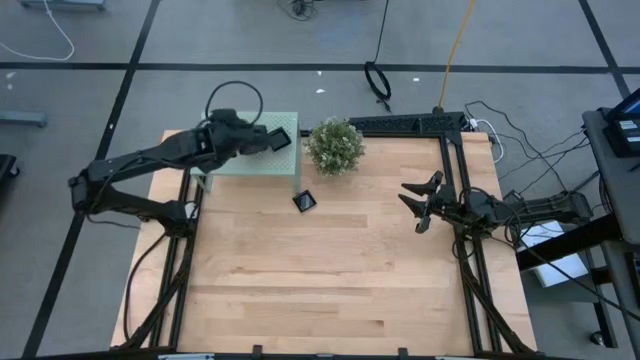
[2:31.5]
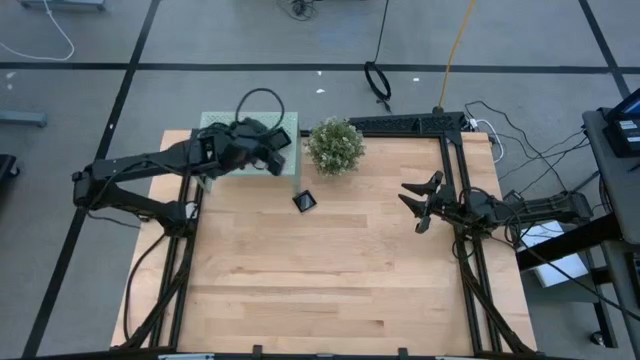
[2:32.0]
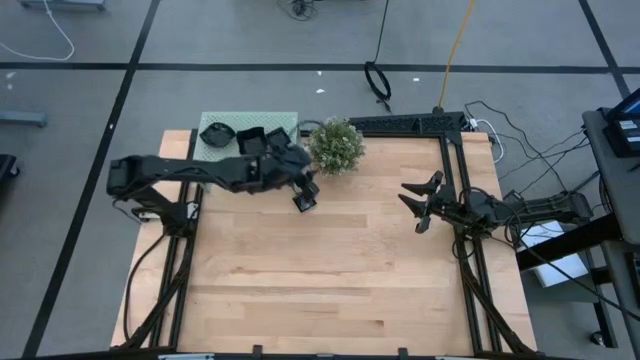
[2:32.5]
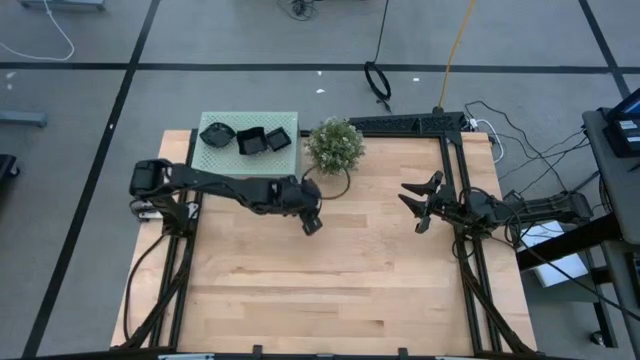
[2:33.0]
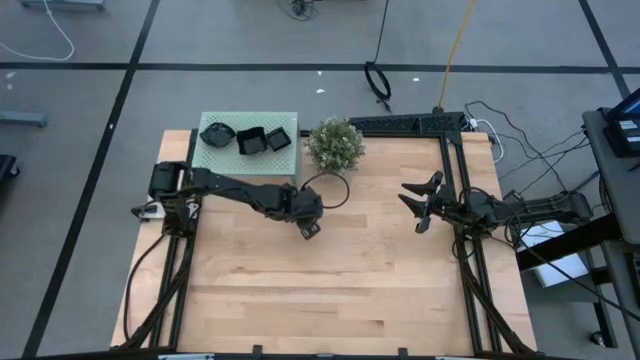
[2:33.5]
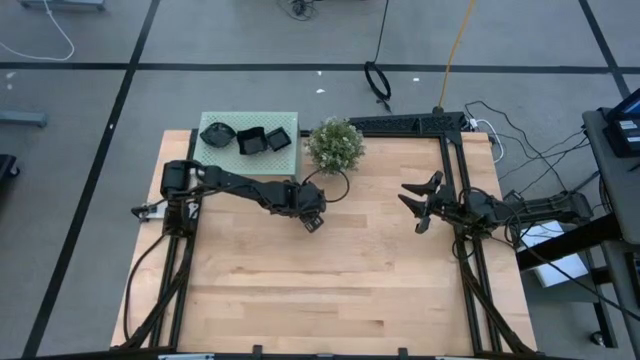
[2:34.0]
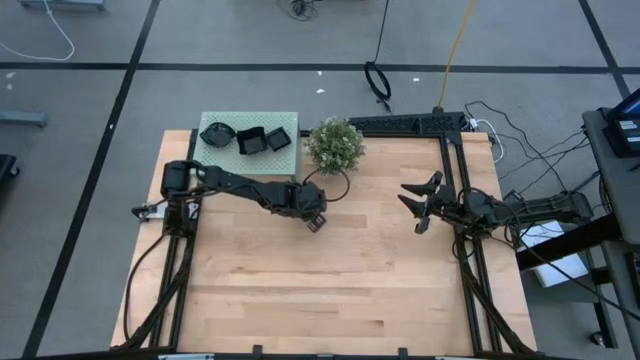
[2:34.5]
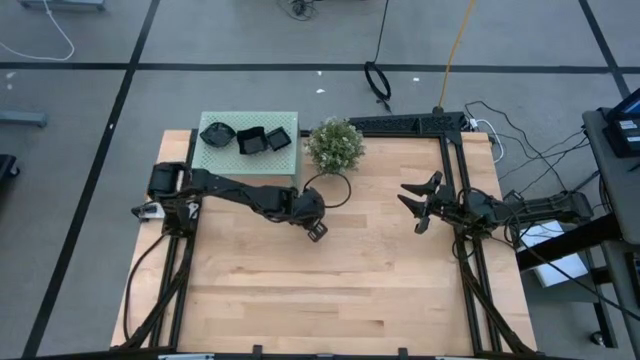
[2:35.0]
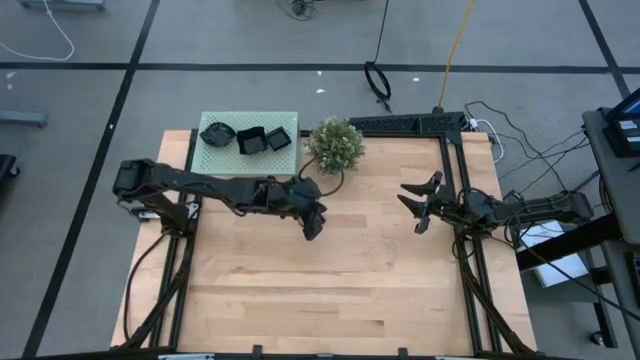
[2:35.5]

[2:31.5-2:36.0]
Task: Pick & Place Mini shaped plates
Stack the square plate on top of the square plate on the shelf

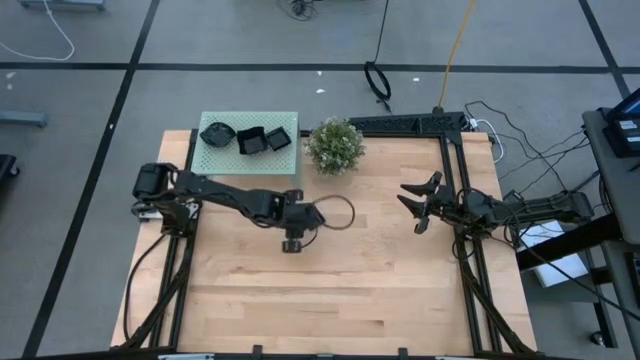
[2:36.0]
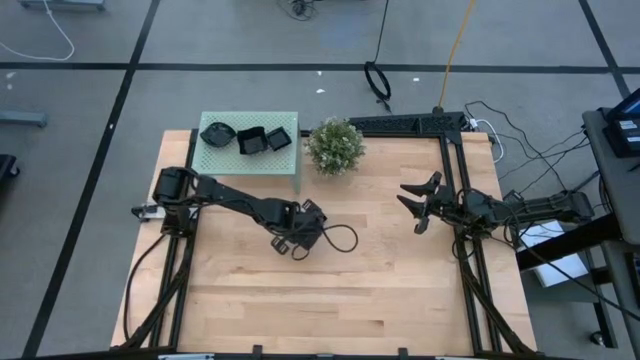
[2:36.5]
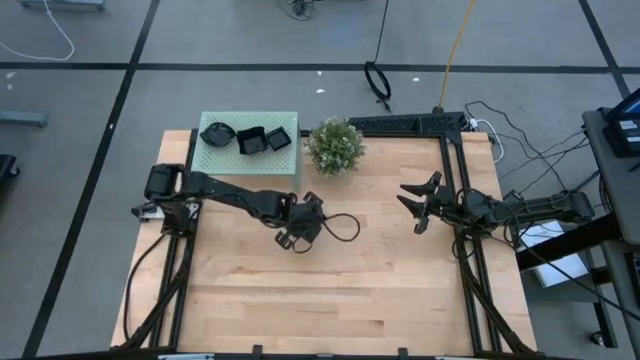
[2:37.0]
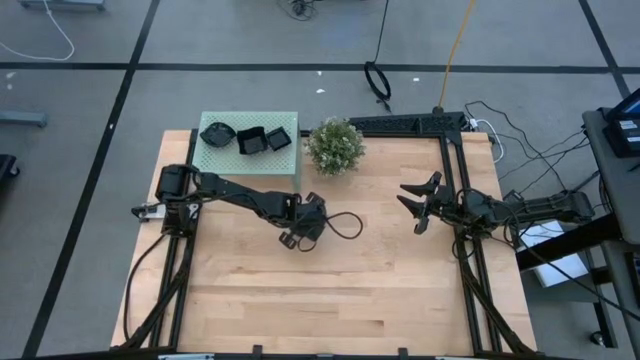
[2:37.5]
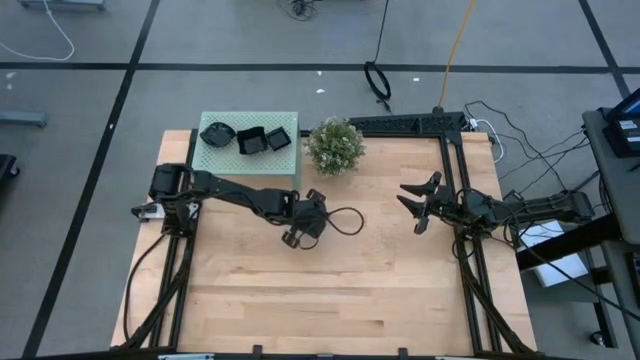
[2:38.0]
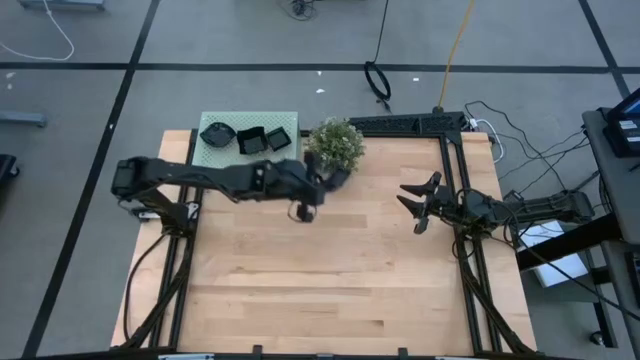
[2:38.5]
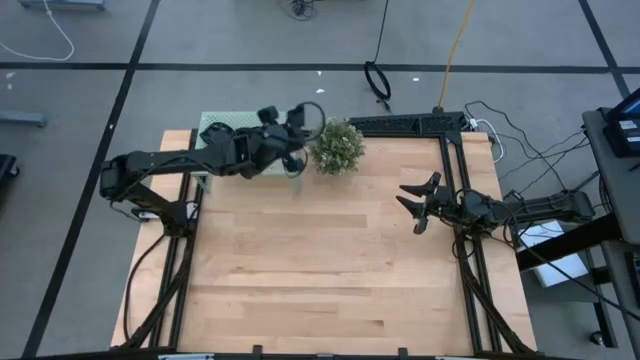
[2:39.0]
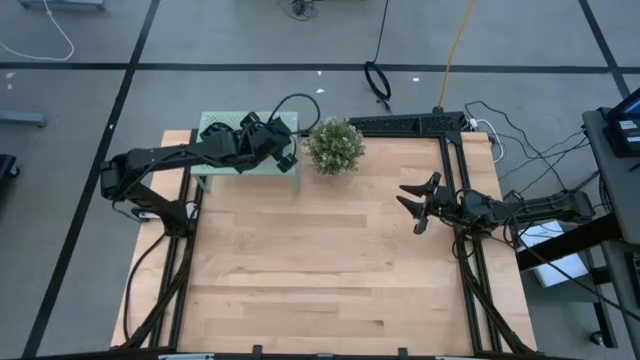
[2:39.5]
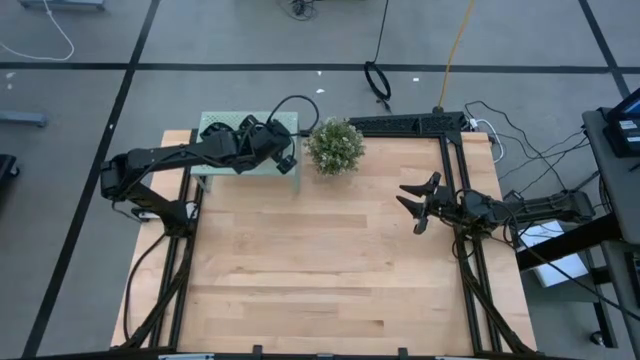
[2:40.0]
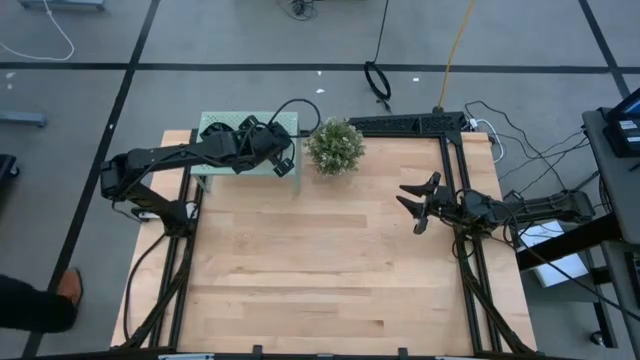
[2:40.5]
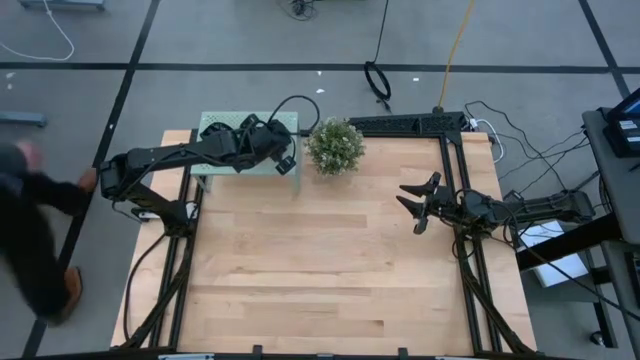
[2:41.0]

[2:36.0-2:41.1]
Stack the square plate on top of the square plate on the shelf

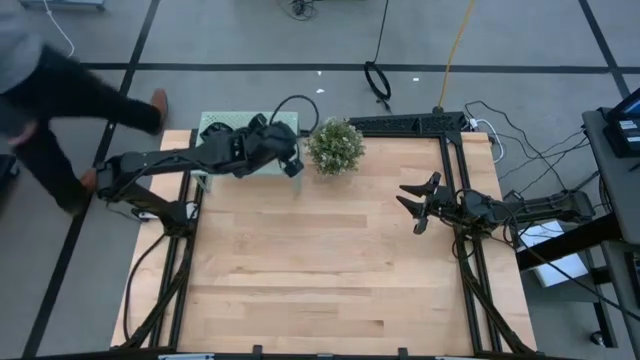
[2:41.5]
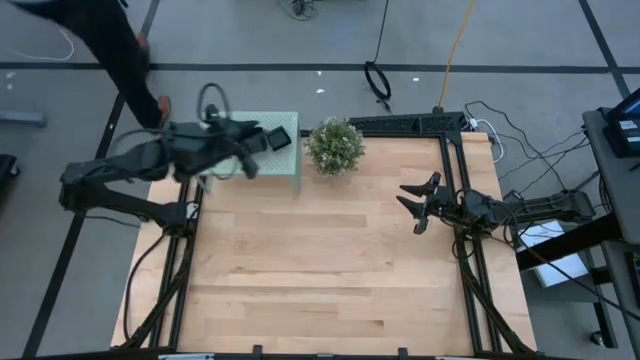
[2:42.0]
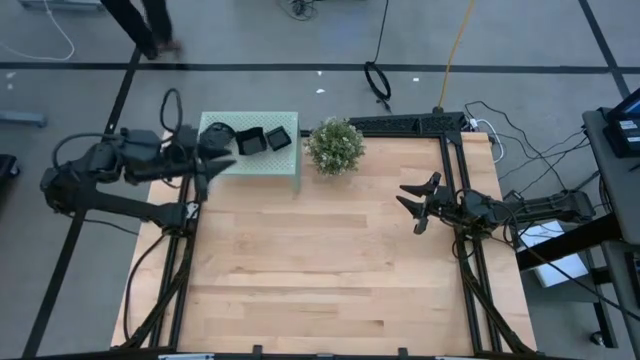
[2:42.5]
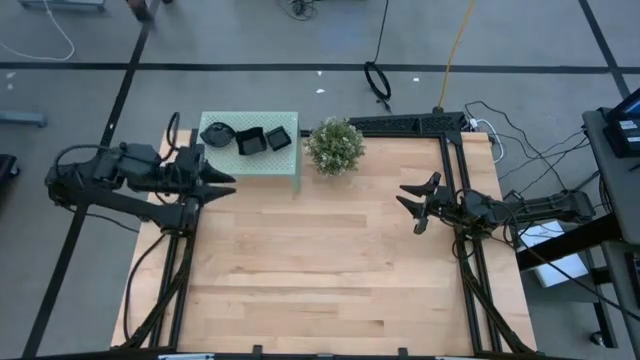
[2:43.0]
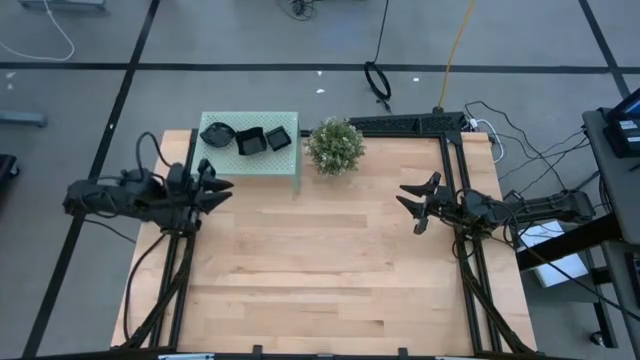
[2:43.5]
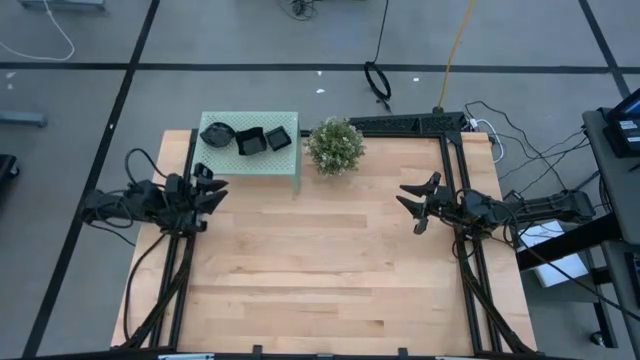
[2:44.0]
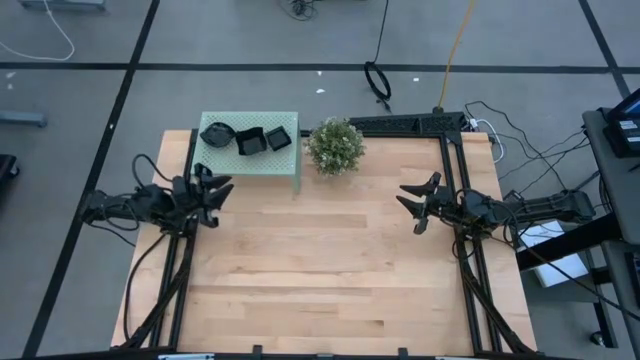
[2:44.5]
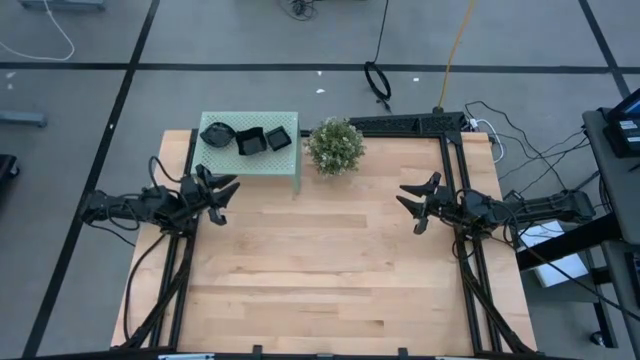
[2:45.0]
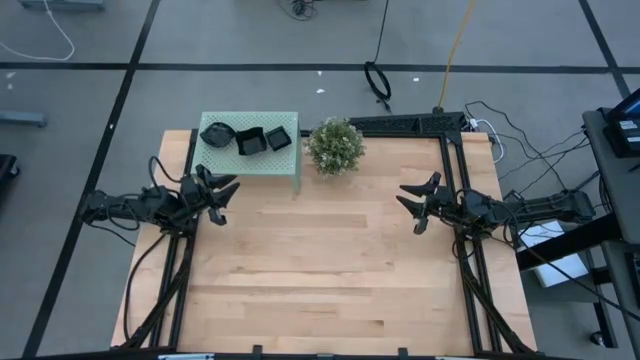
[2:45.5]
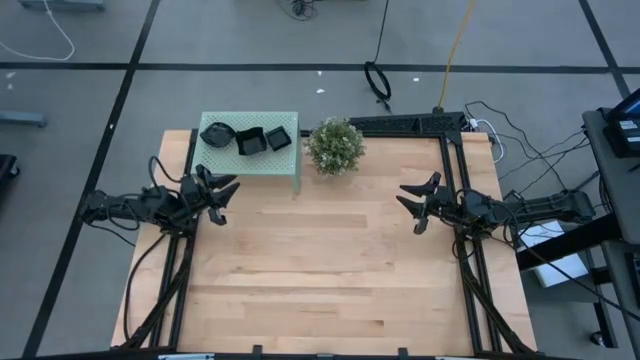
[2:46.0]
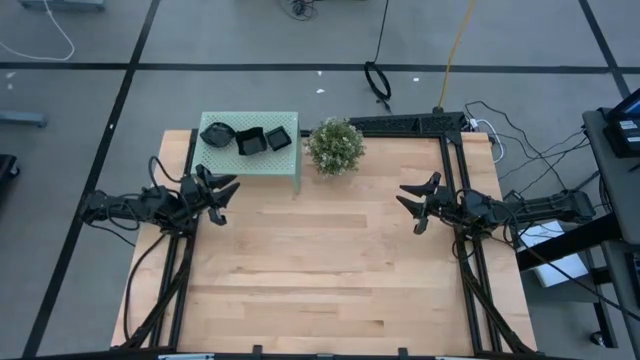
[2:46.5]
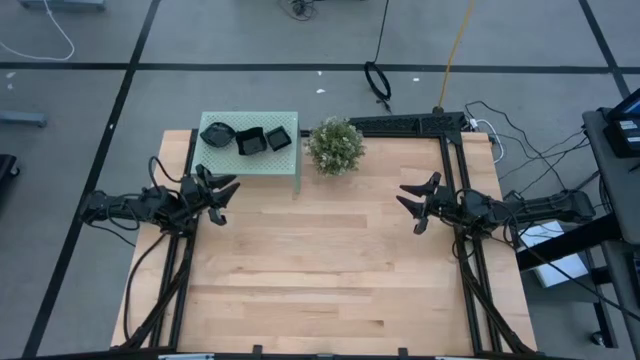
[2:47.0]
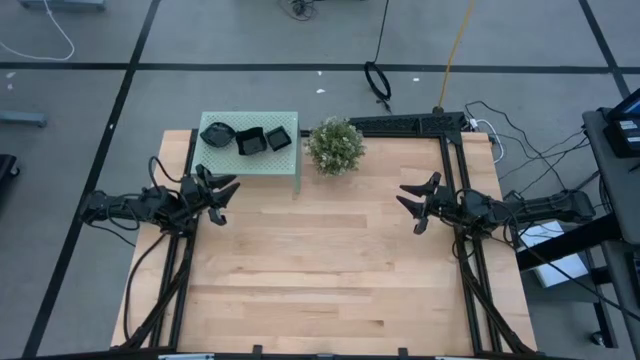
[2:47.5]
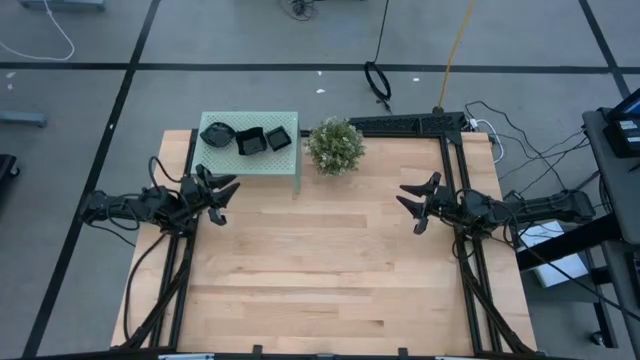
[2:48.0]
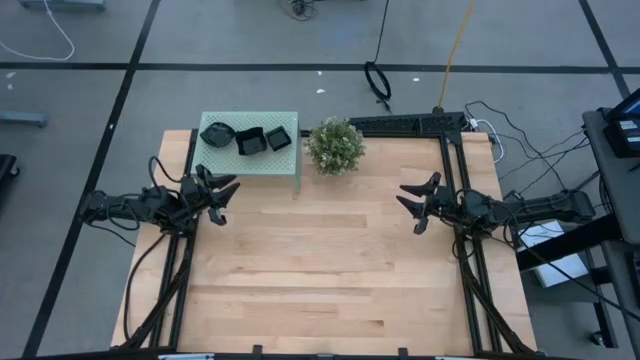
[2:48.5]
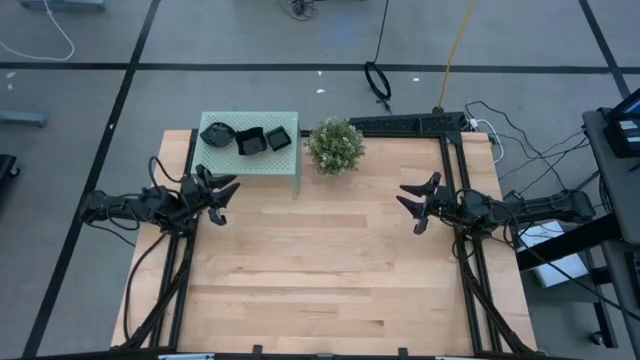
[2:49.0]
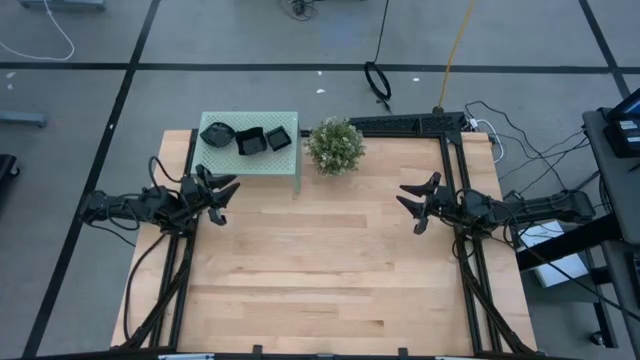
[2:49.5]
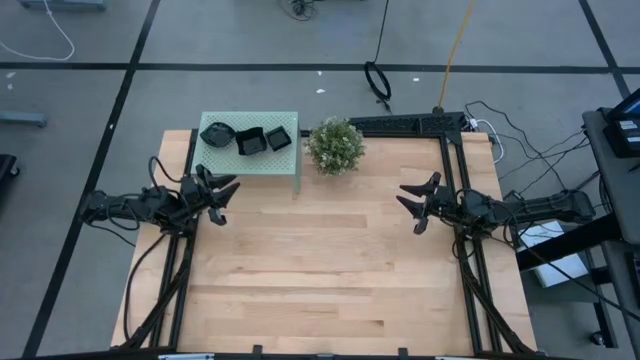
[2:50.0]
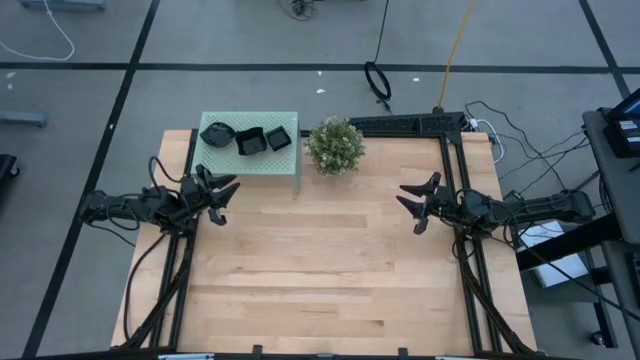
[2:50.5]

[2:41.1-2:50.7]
Return to Home Position

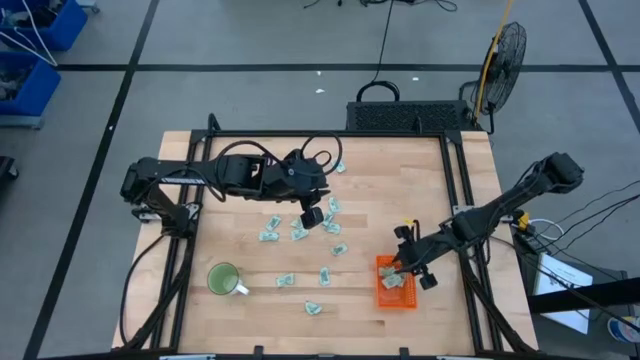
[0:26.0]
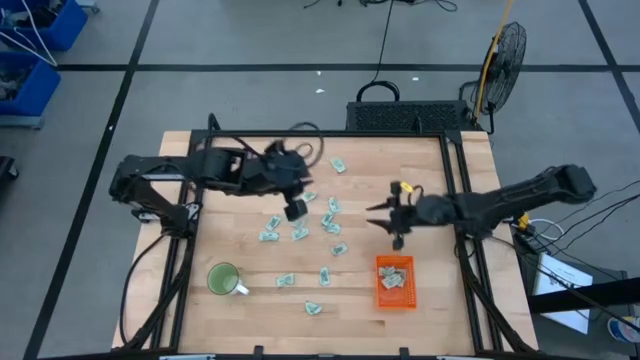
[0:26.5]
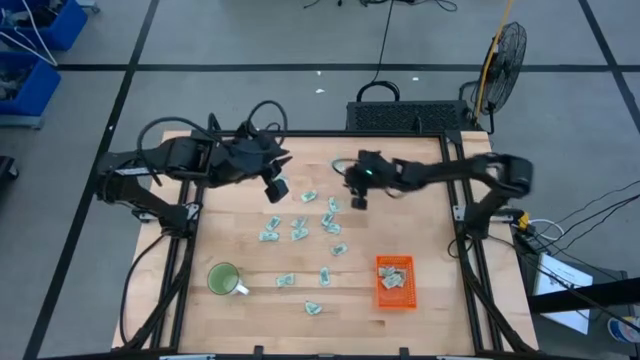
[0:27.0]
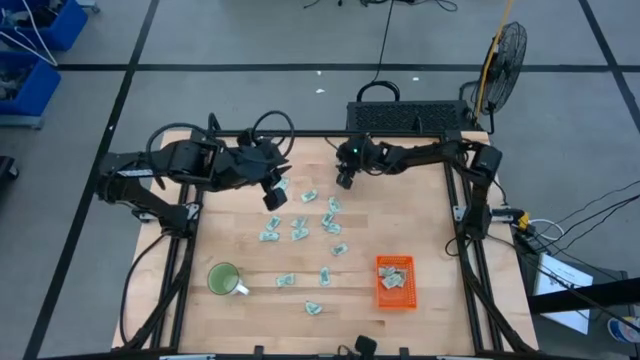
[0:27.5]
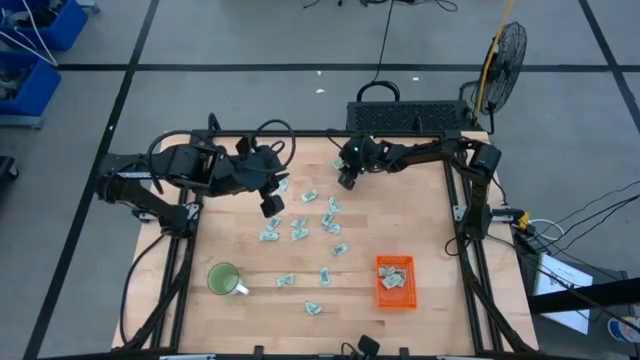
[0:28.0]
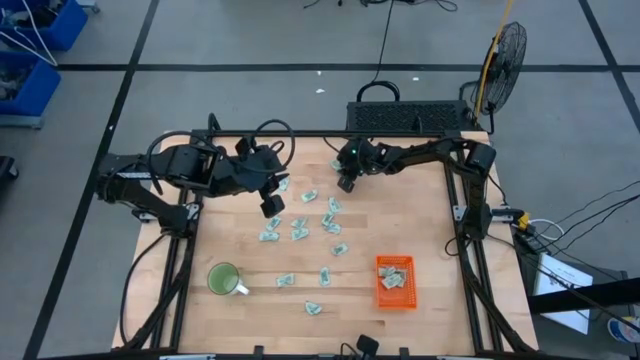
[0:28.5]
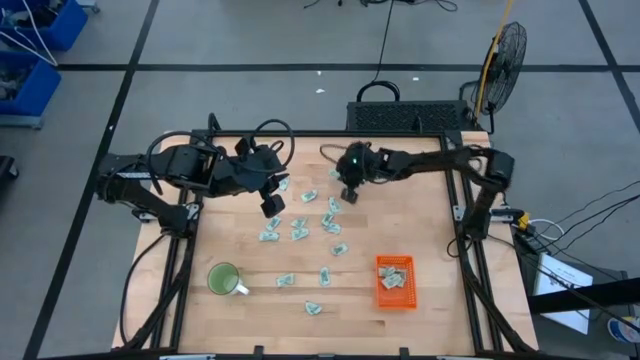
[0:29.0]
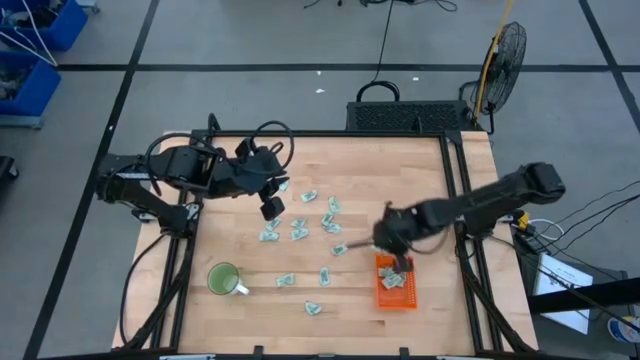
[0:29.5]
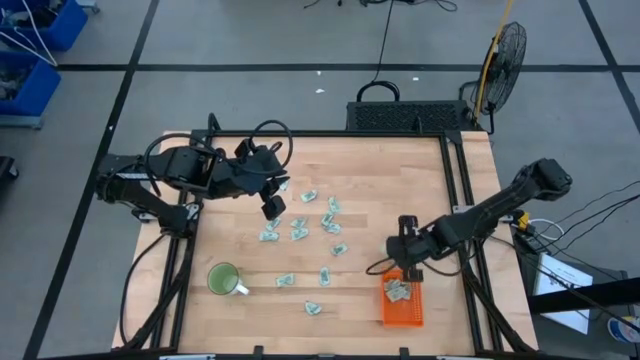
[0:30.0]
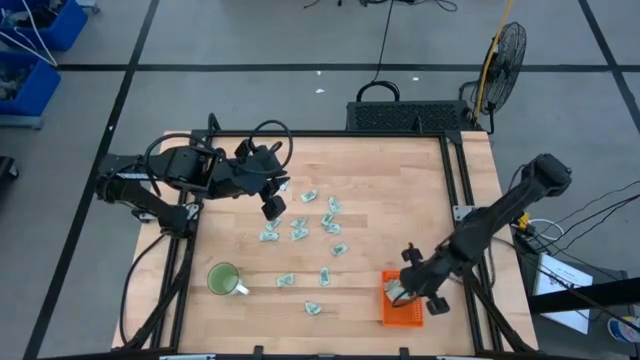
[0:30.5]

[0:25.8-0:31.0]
Task: Pick and place Stevia / Truvia into bins
Put the stevia packet into the orange basket
